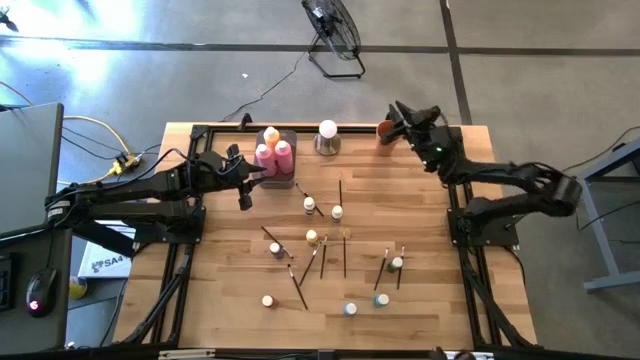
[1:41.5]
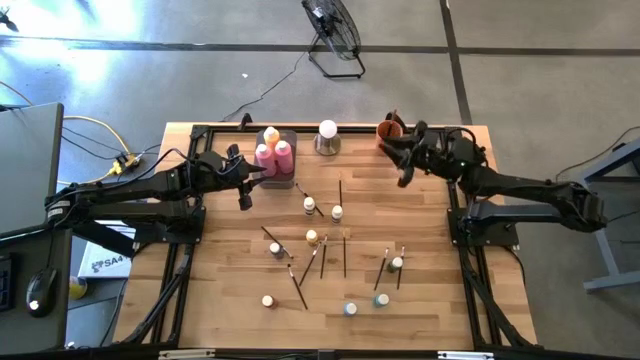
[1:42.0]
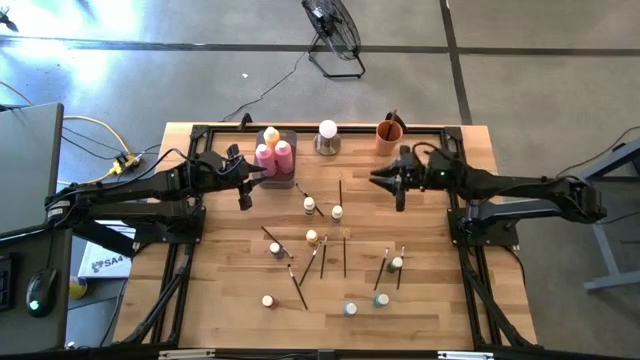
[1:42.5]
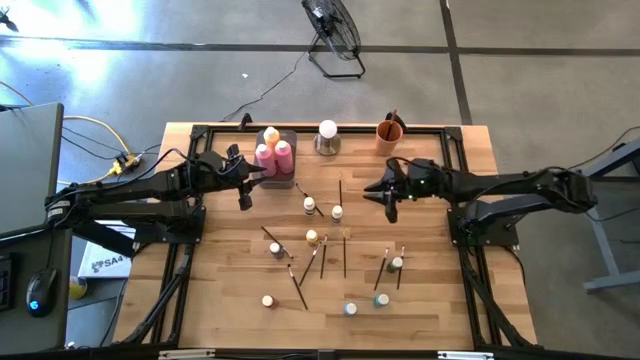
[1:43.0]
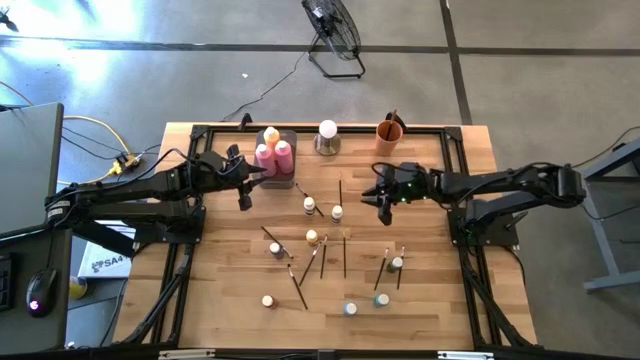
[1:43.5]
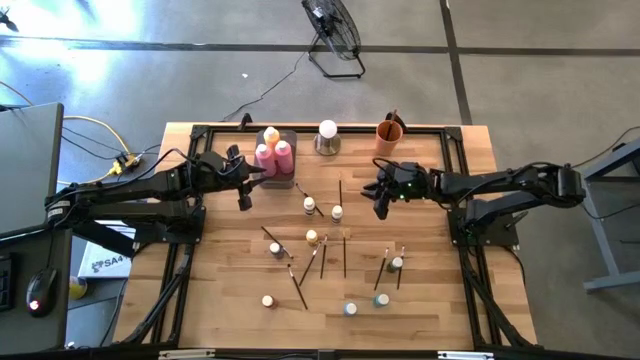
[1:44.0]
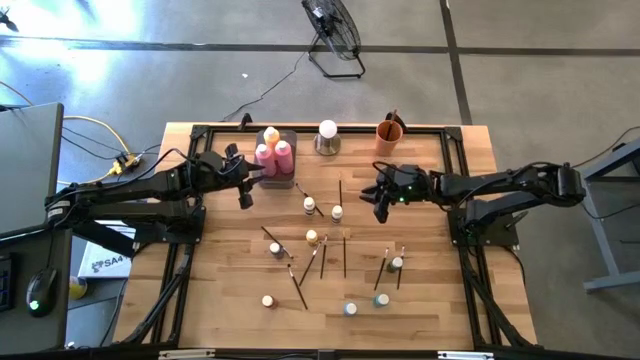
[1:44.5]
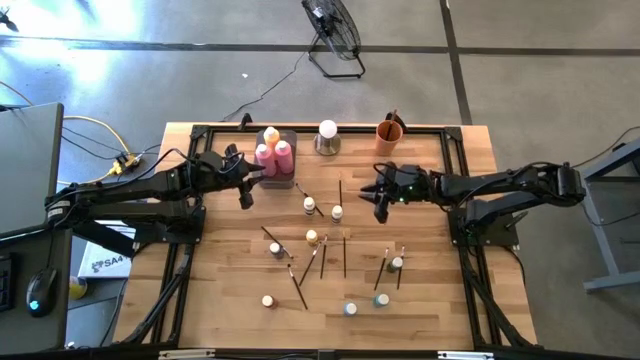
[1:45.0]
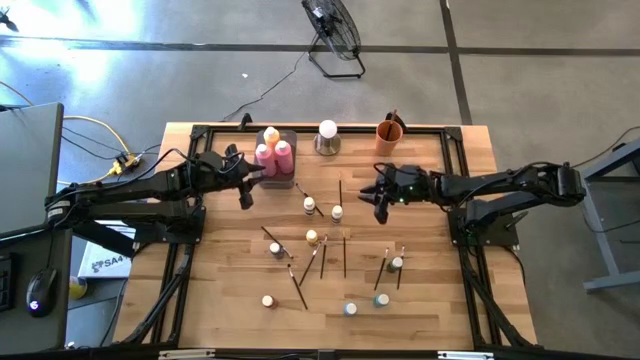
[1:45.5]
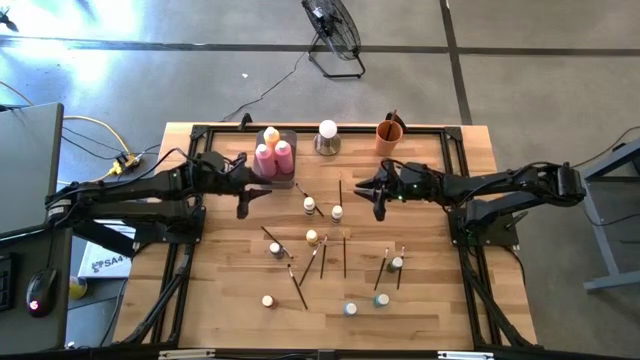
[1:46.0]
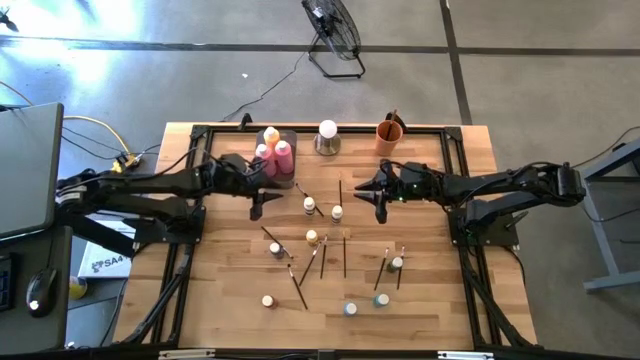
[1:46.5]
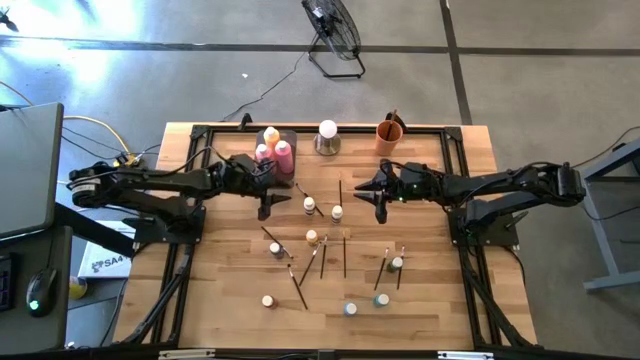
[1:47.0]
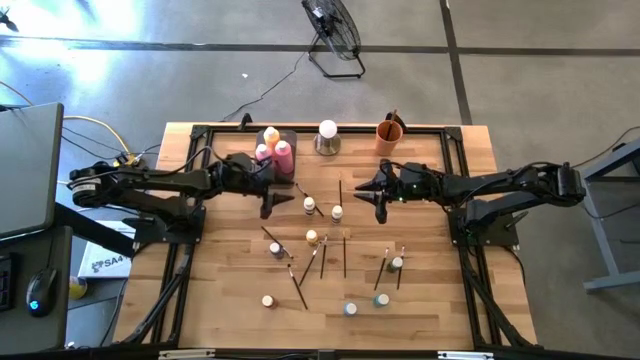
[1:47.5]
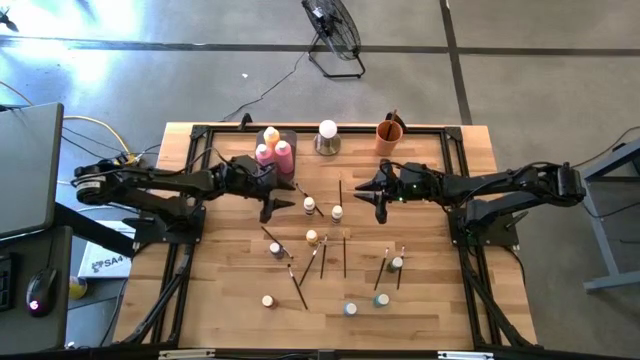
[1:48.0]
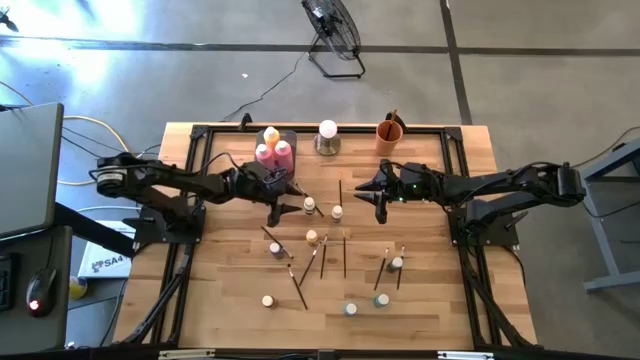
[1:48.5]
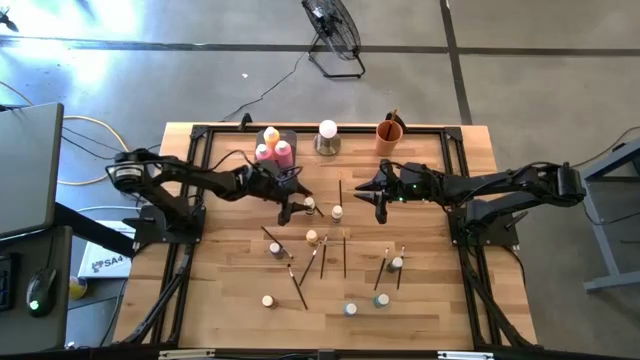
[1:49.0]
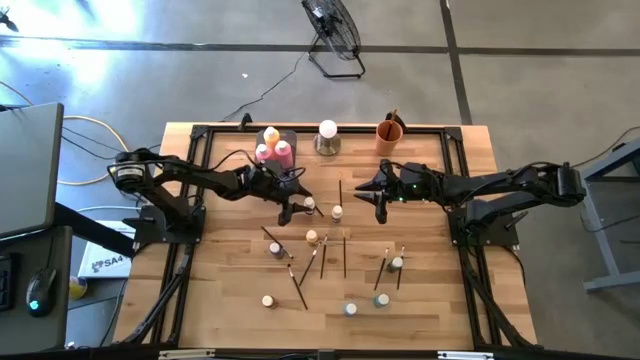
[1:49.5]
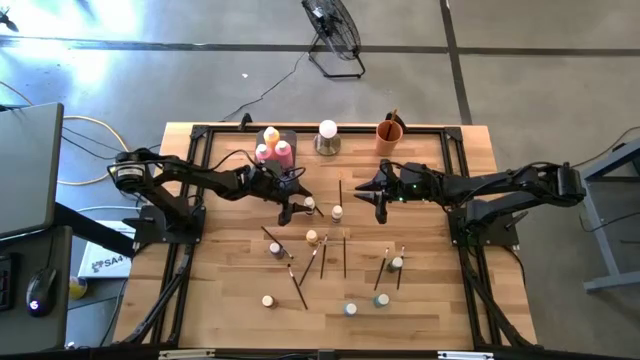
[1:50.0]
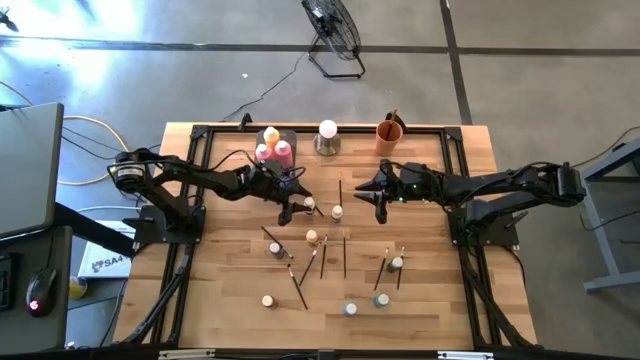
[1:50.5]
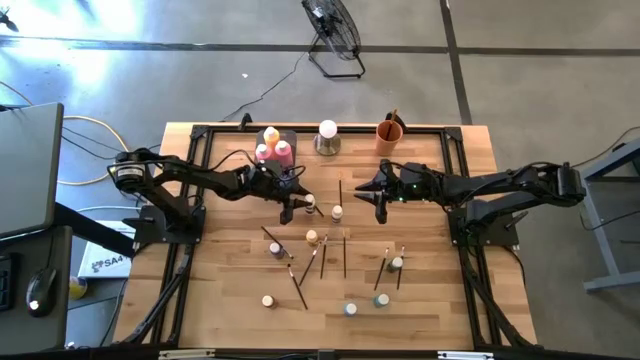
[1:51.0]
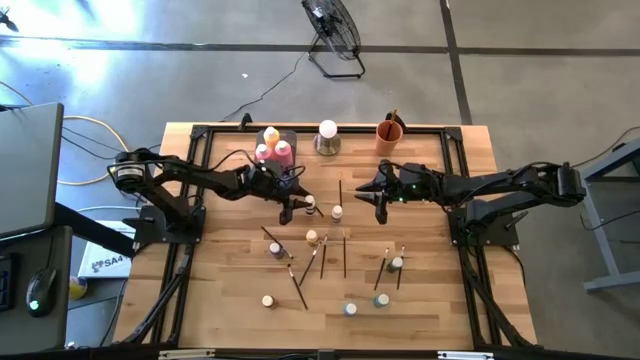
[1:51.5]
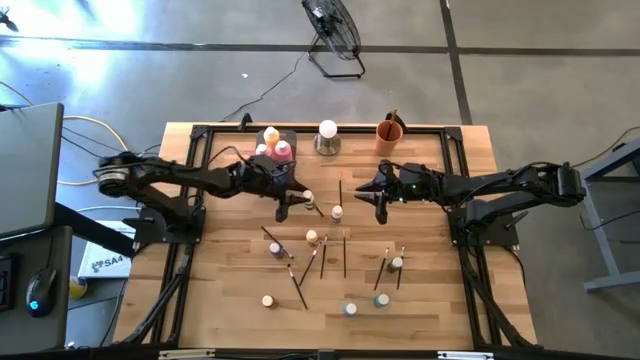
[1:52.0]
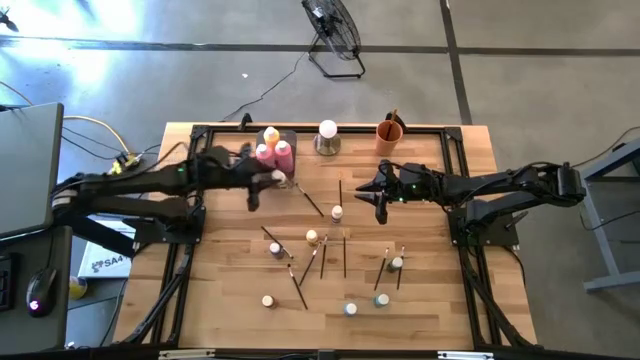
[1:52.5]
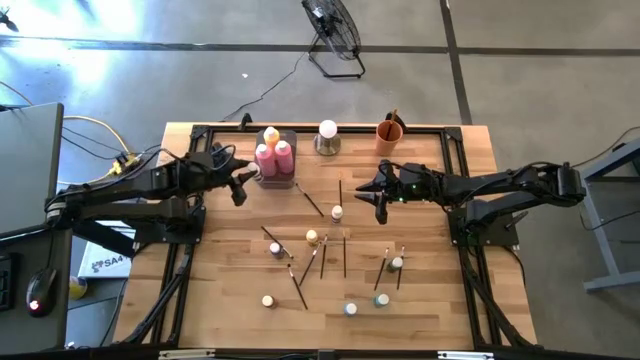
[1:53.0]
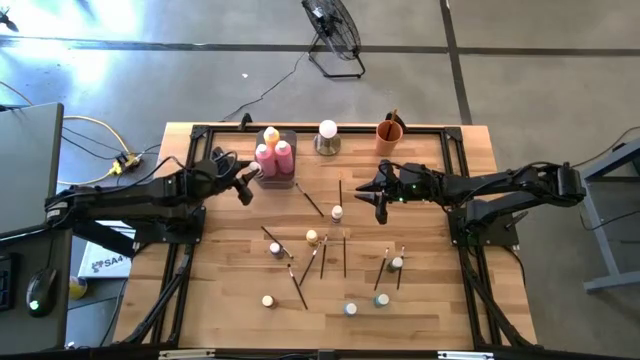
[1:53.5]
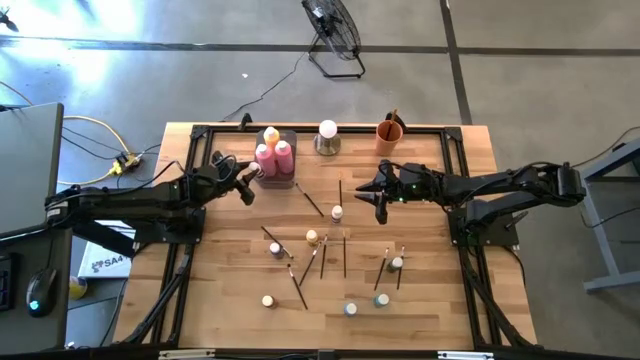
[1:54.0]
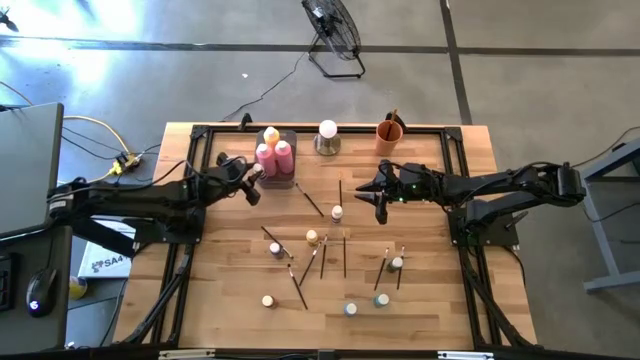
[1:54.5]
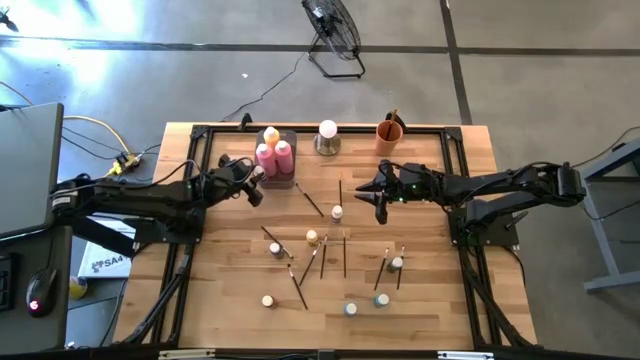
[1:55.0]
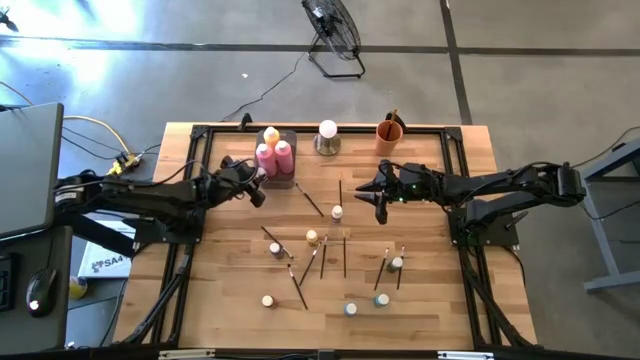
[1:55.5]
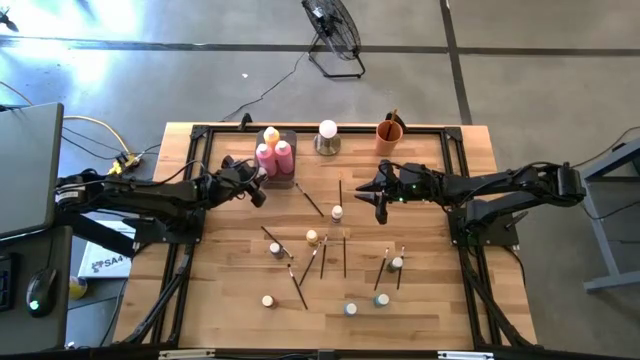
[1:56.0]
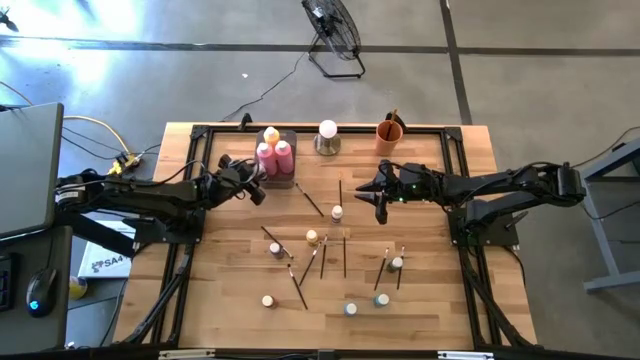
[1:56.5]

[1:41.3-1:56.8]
Task: Pick & Place Paint Supplies
Put the left small white black paint bottle into the gray bin

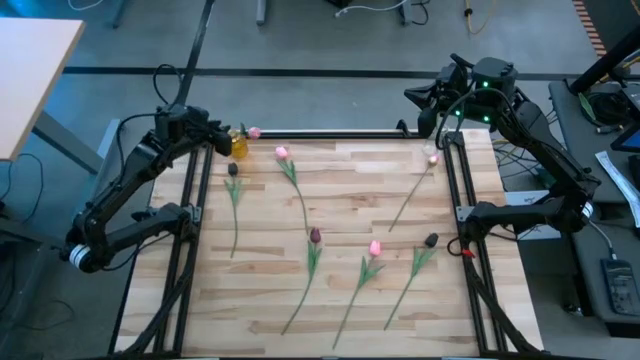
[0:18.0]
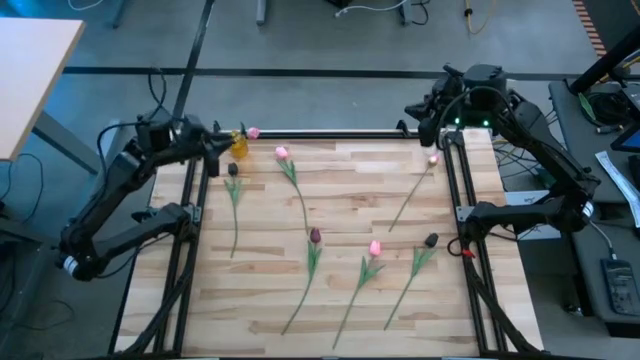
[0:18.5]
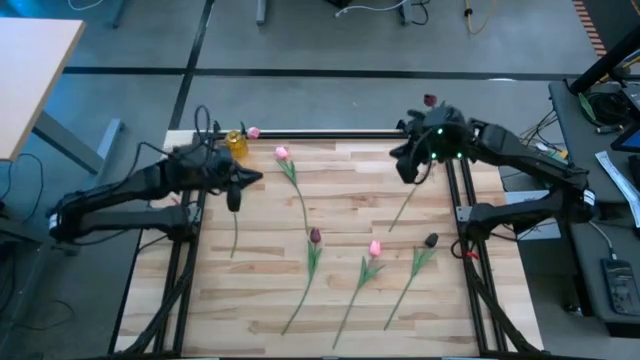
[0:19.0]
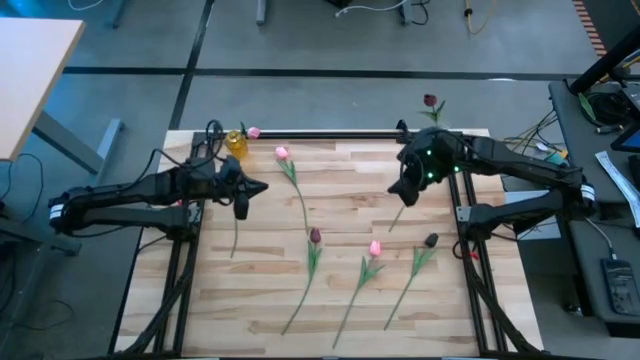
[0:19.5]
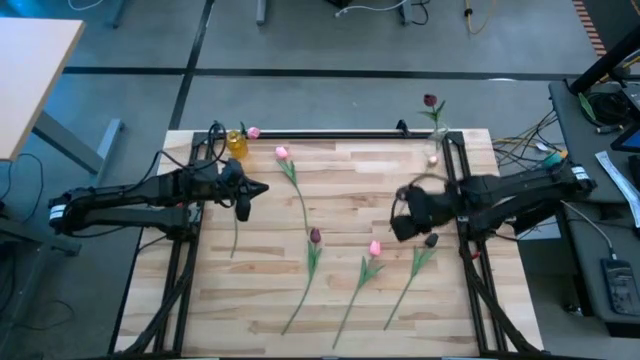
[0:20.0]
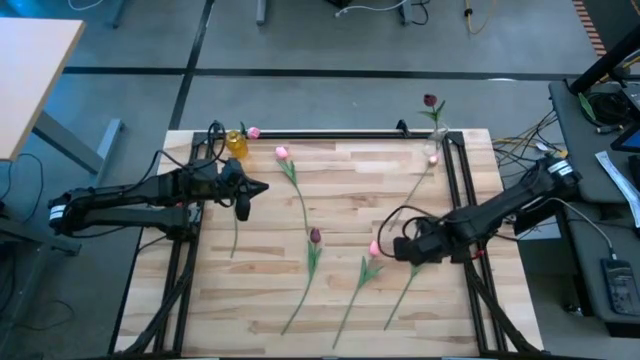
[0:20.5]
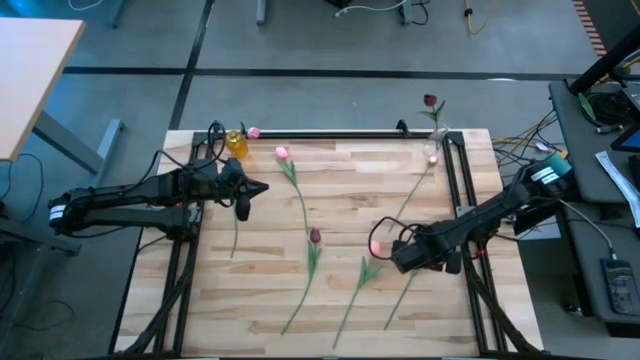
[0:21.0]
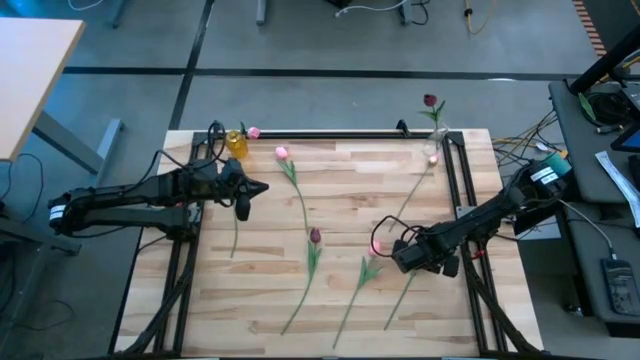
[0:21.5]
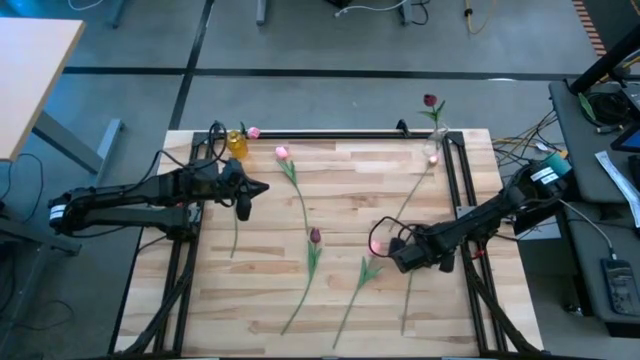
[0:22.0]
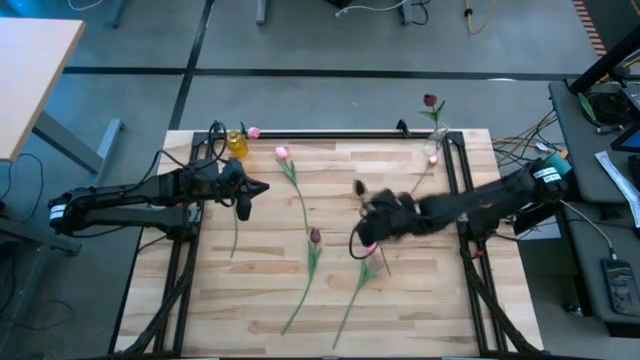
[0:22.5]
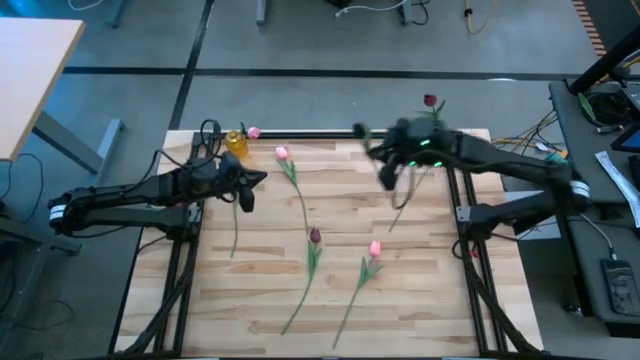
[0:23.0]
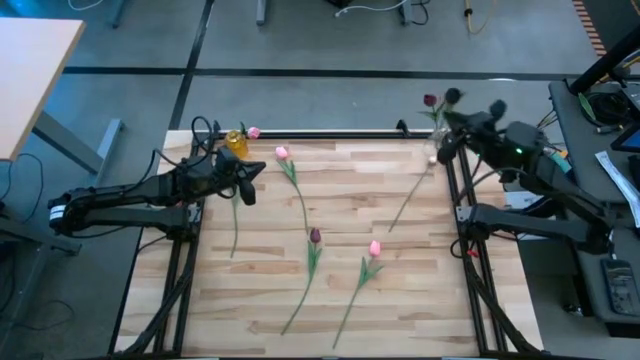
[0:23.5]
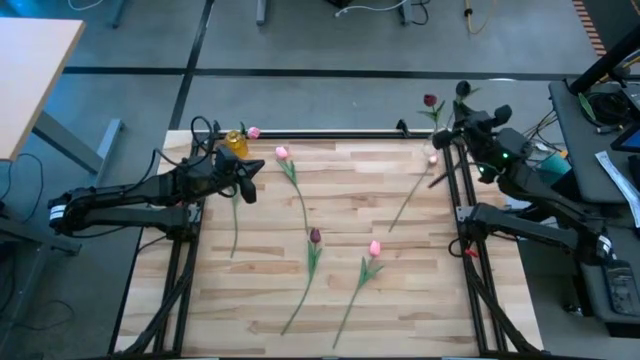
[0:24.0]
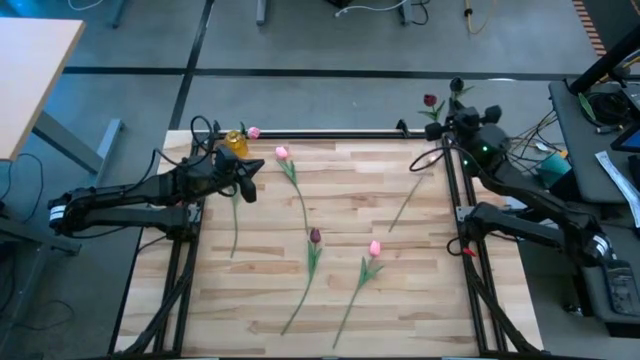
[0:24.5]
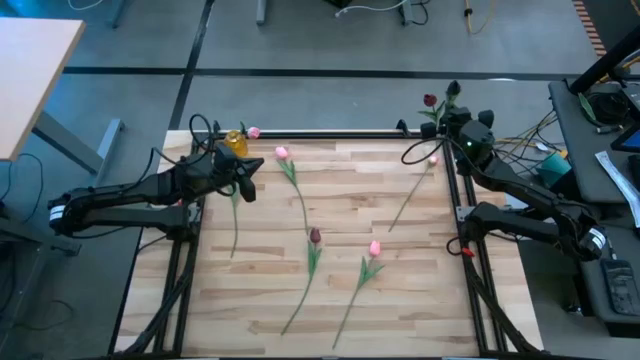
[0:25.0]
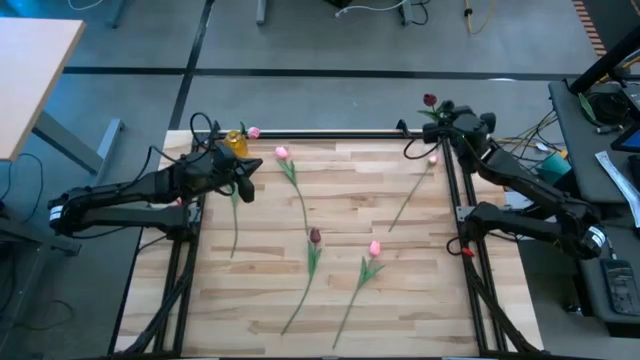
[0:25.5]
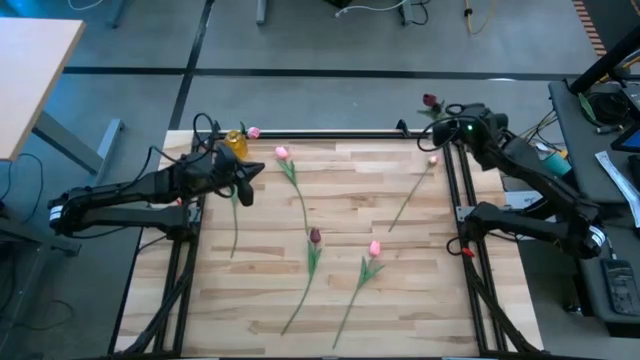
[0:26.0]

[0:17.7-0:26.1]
Task: Sort flowers into vase by color
Put the black tulip into the transparent vase
